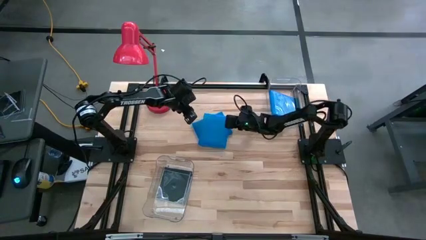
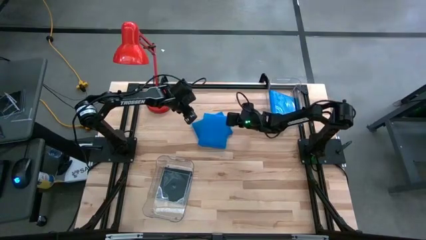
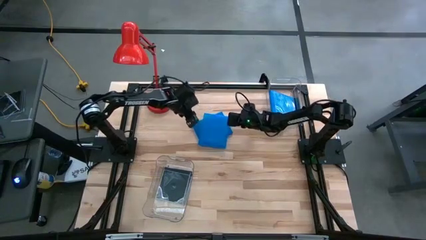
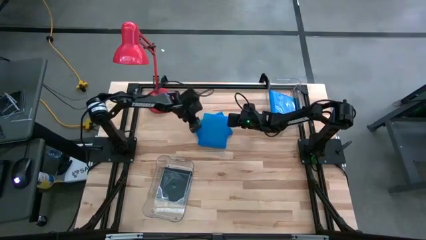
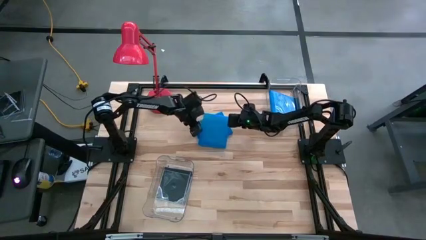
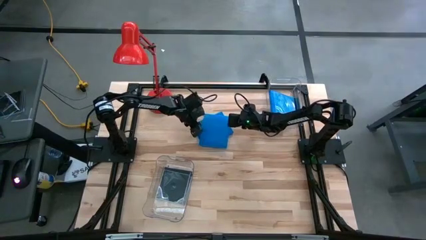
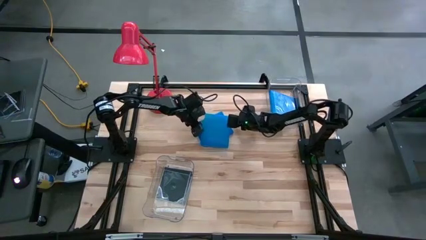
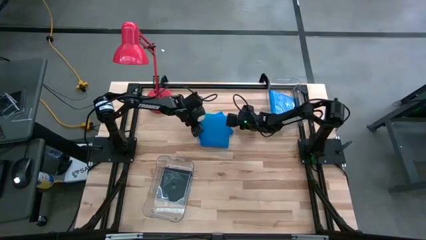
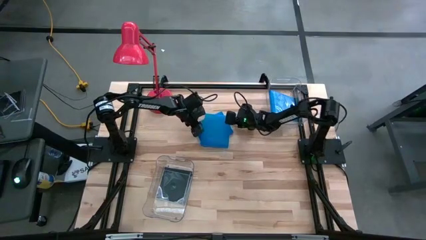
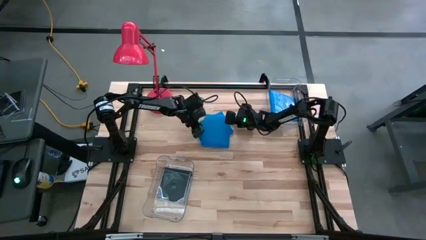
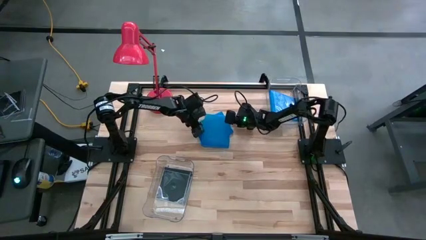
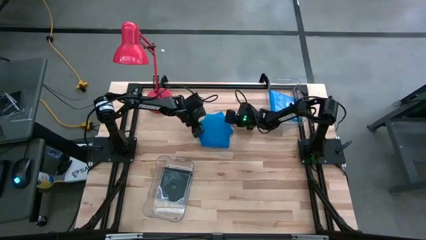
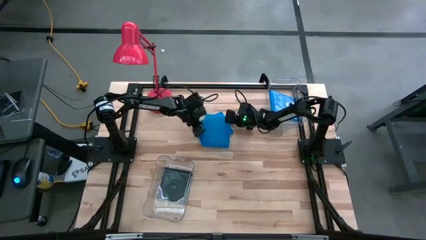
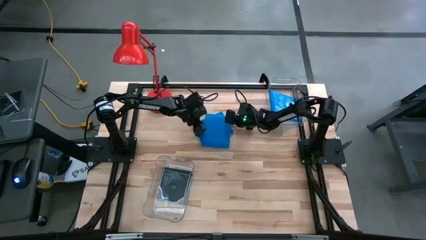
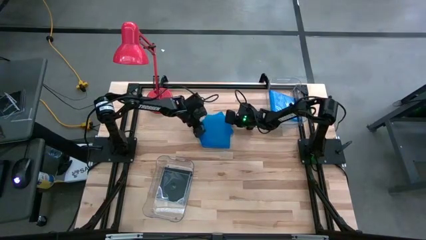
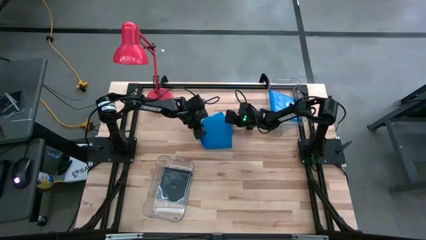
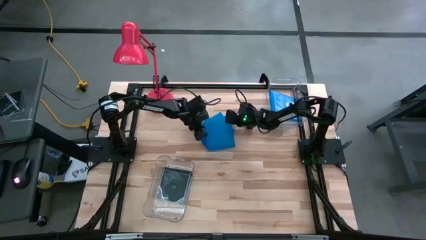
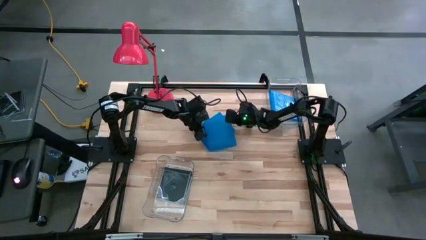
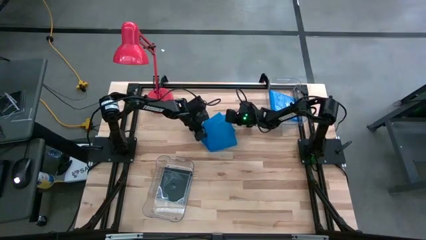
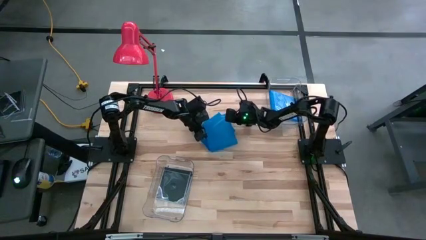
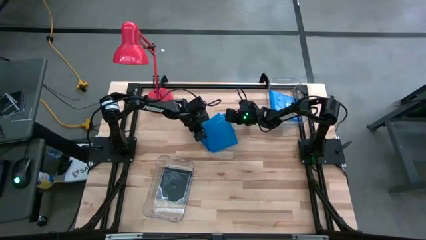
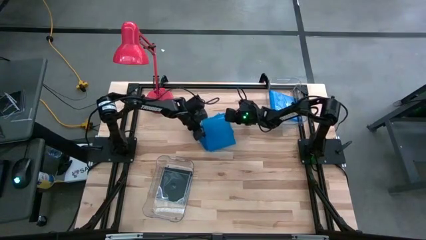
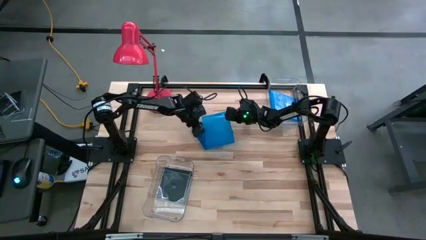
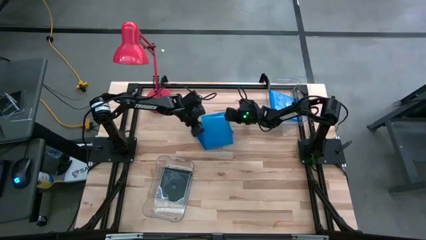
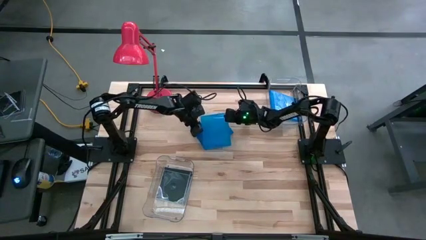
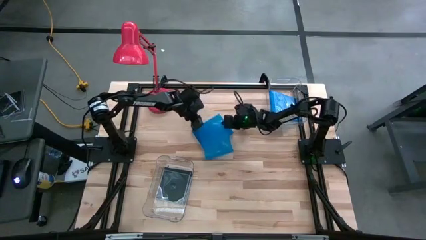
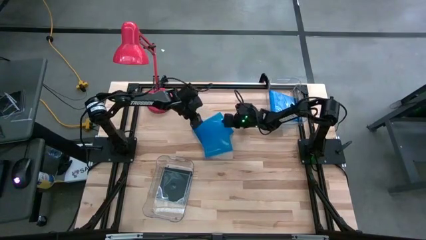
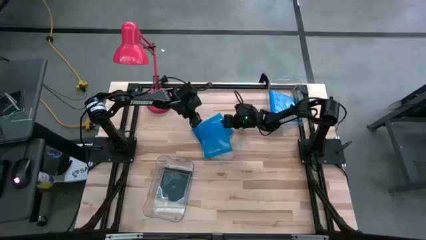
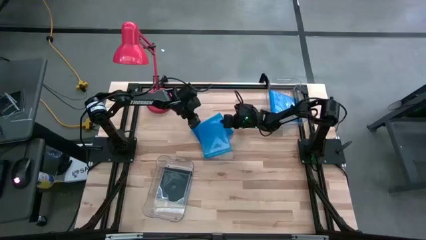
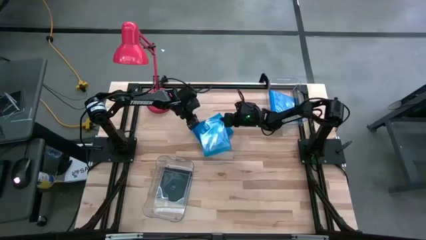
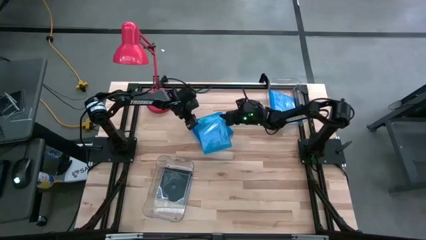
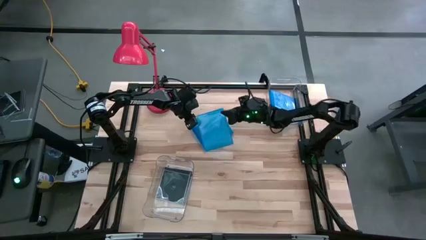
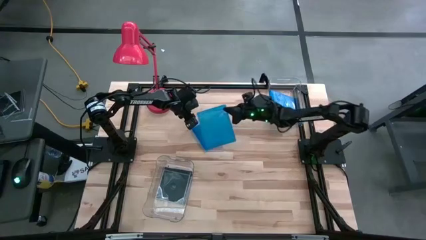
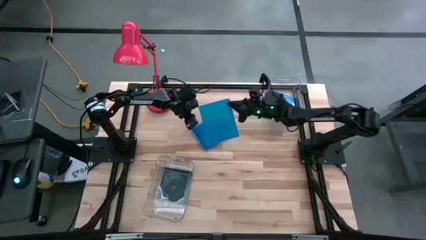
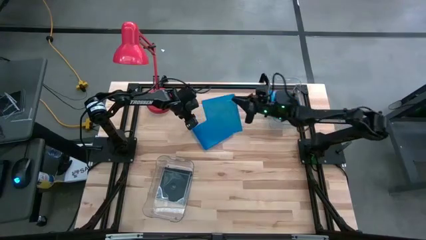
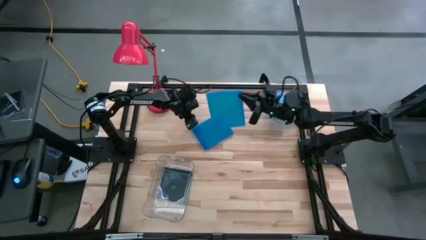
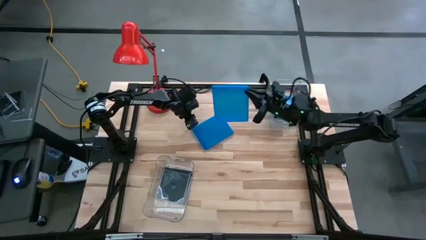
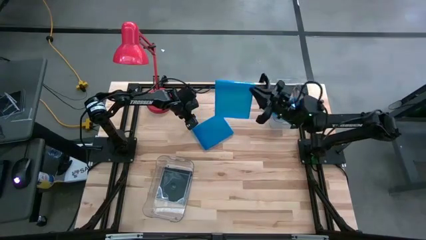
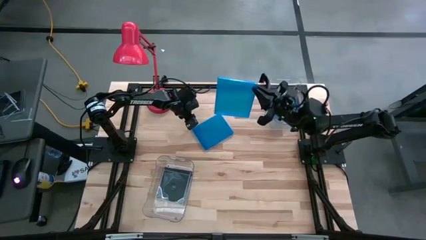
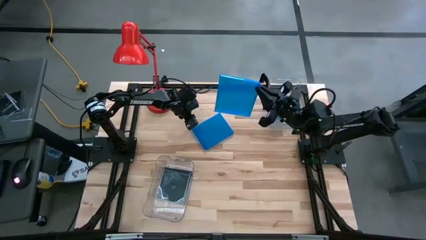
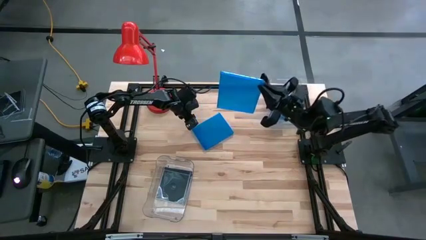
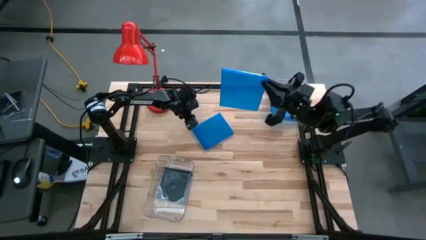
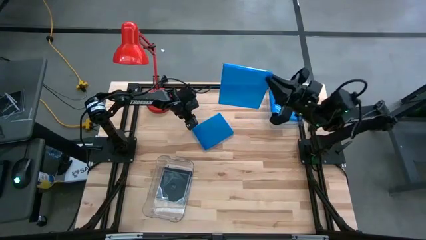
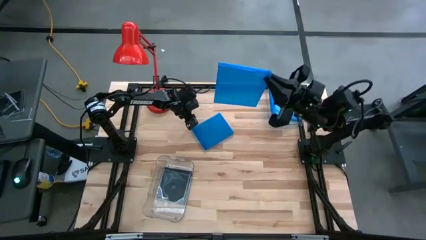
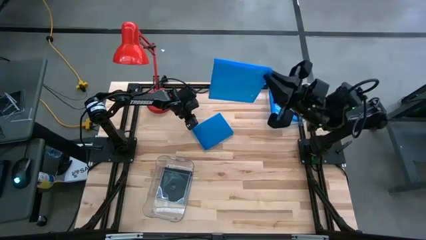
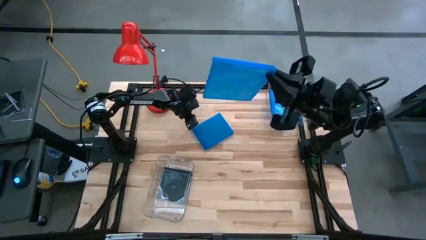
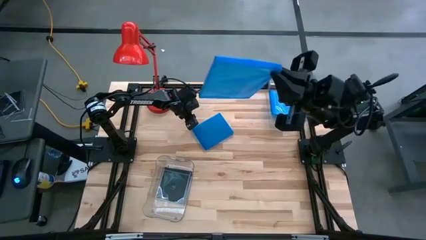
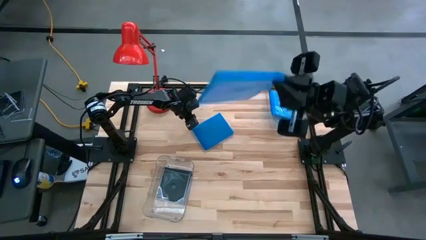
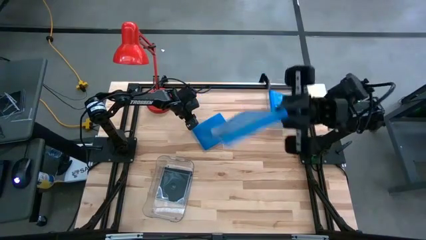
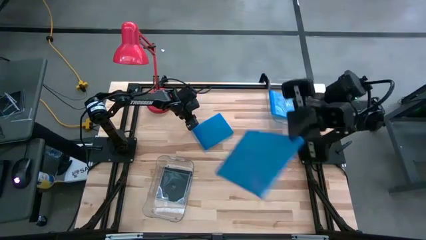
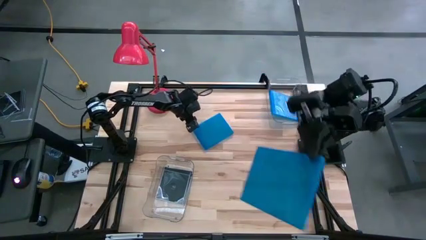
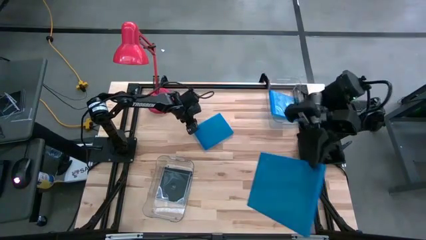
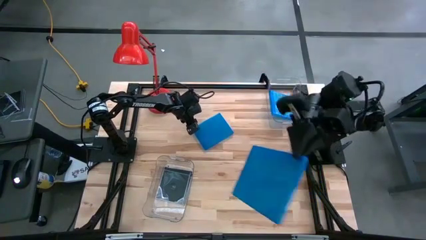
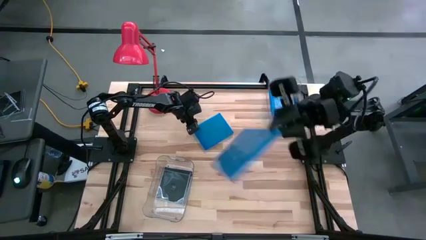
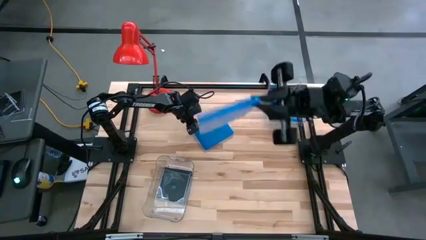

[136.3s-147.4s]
Task: Pick & place jewel cases by type
Put the blue cd case into the top transparent bin

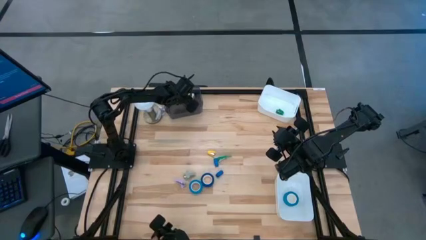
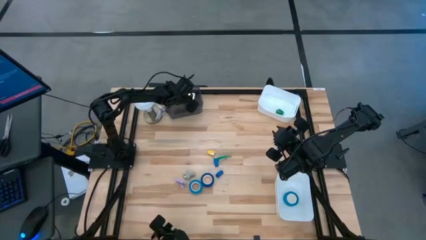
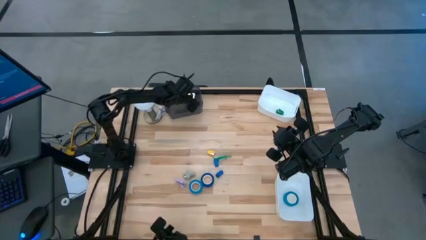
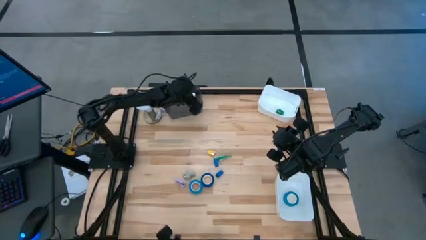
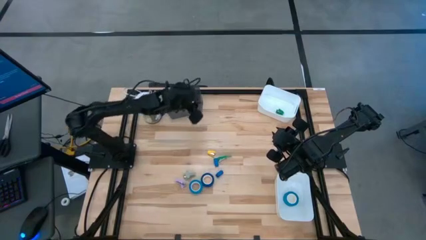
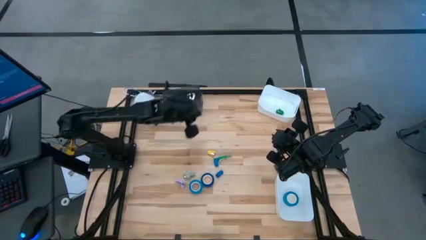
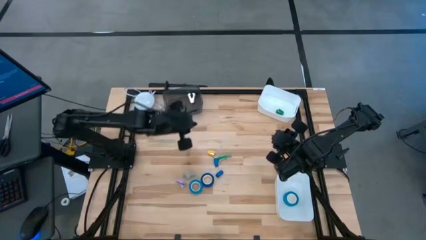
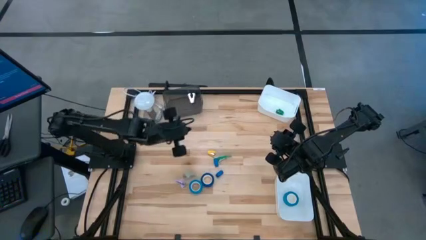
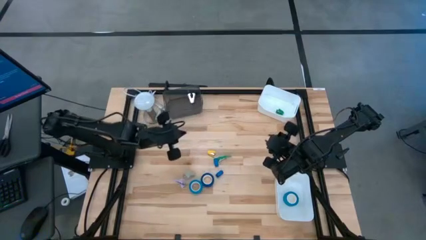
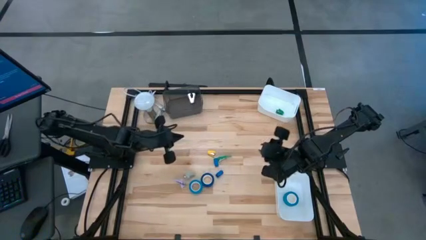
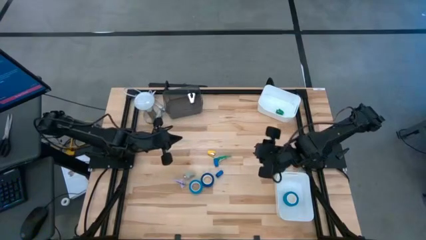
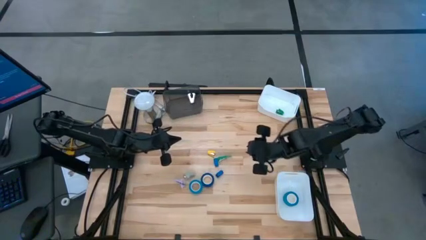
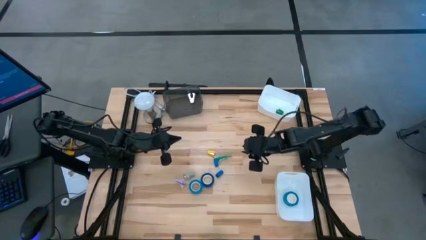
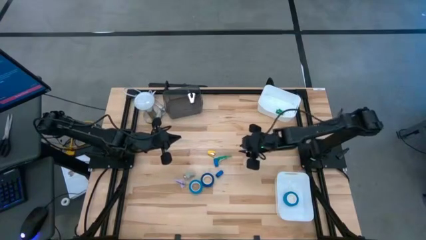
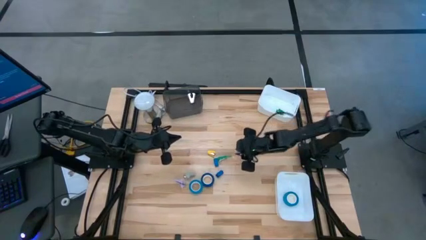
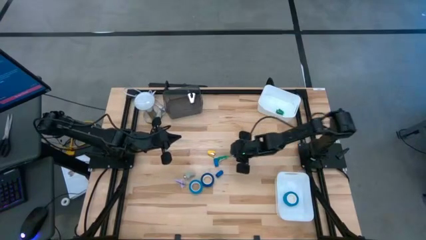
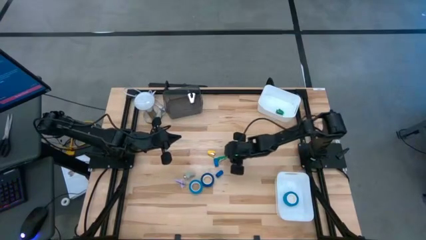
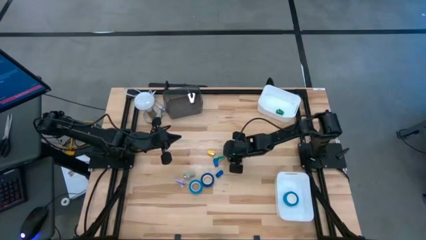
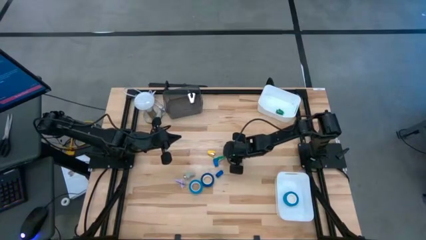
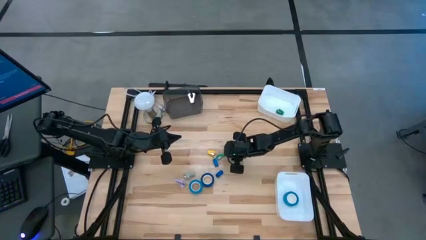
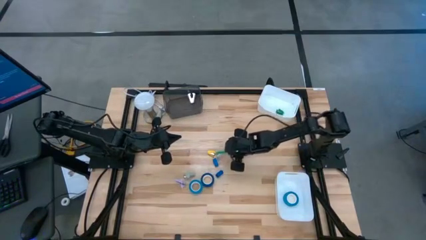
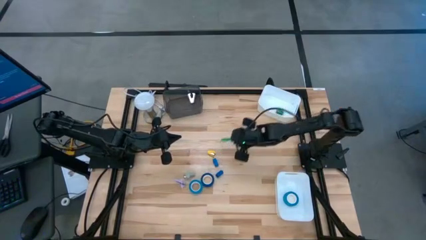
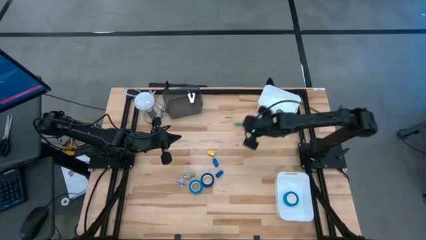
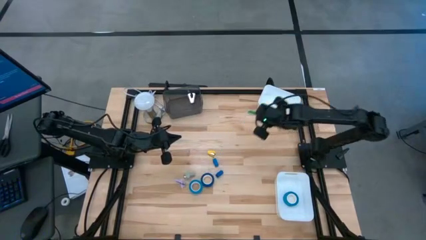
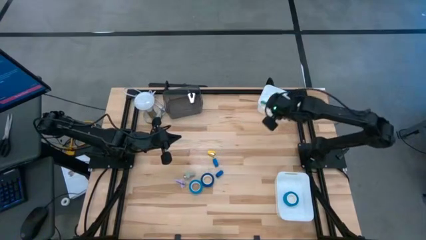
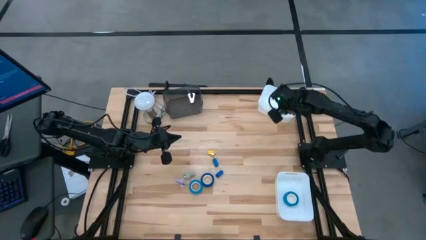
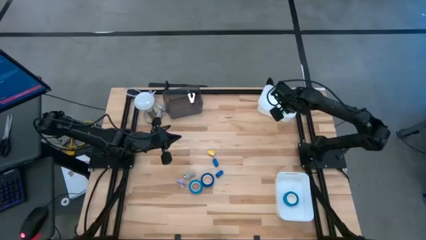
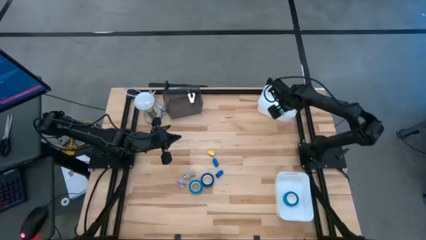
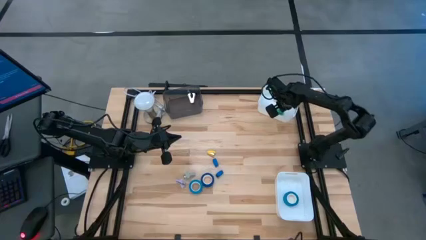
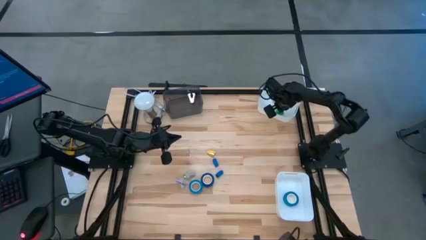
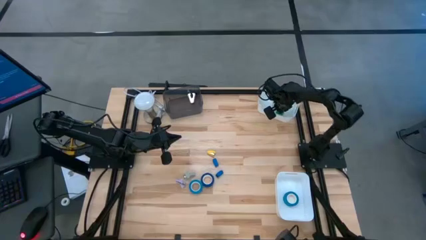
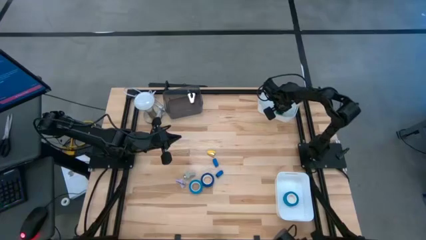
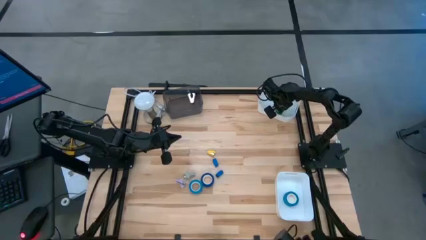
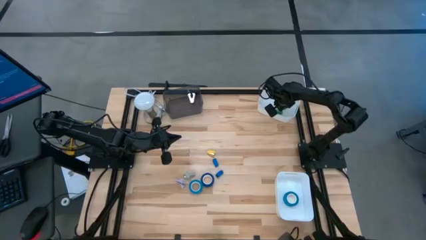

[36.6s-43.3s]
Task: Pick and place Stapler, Stapler remover, tape
Put the green stapler into the top white bin
